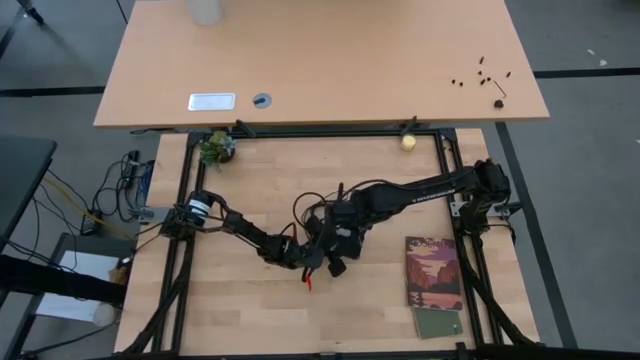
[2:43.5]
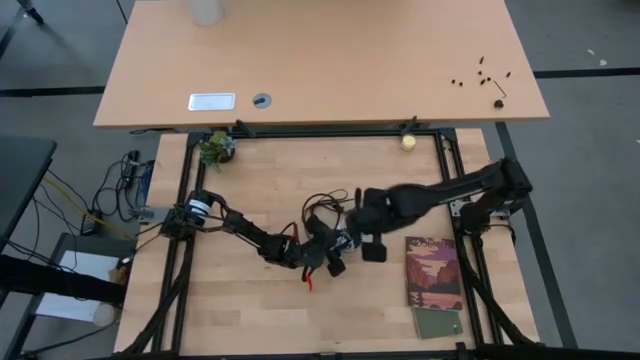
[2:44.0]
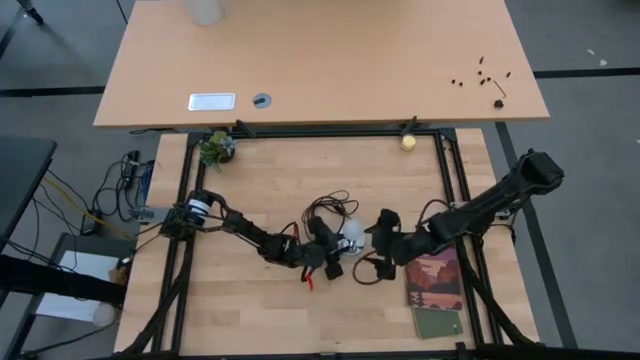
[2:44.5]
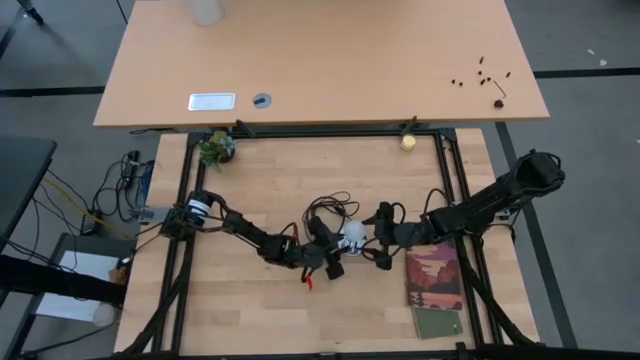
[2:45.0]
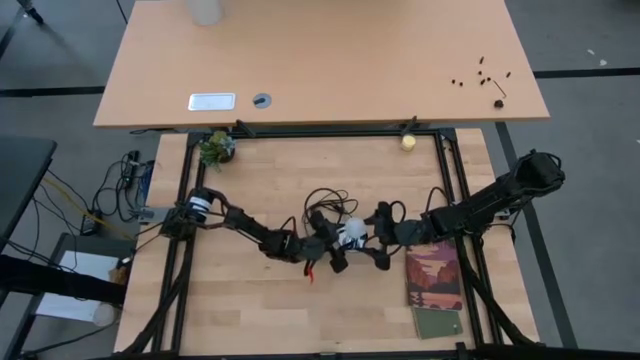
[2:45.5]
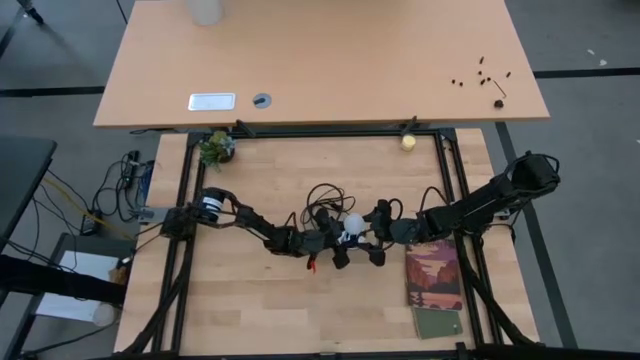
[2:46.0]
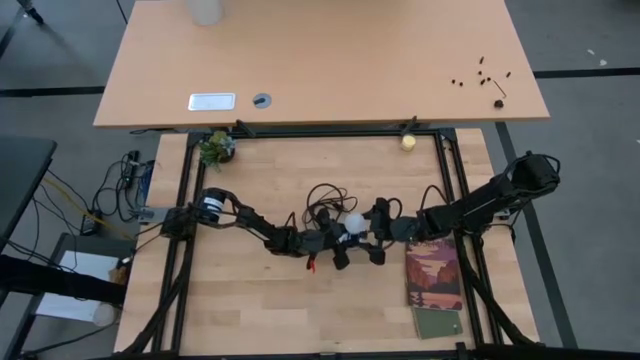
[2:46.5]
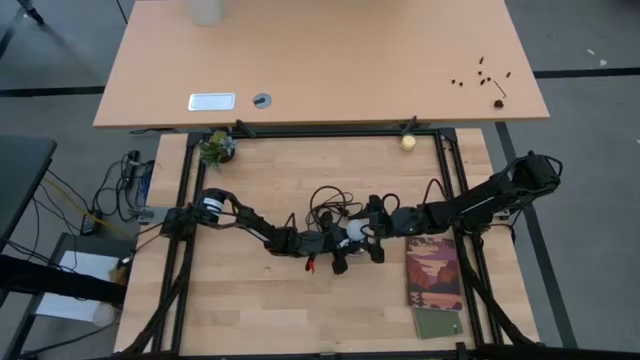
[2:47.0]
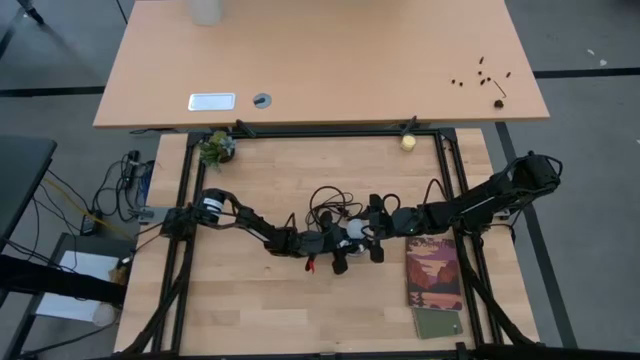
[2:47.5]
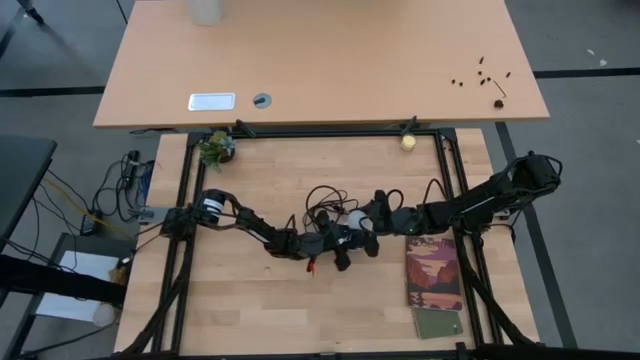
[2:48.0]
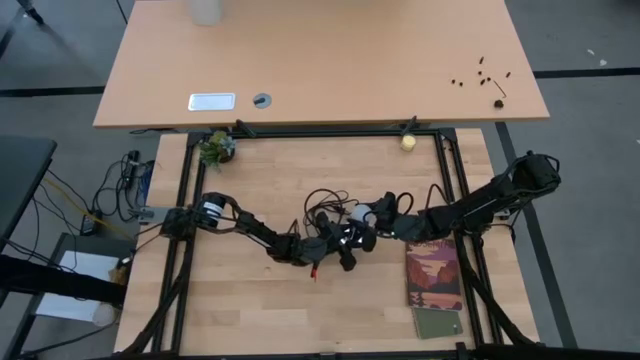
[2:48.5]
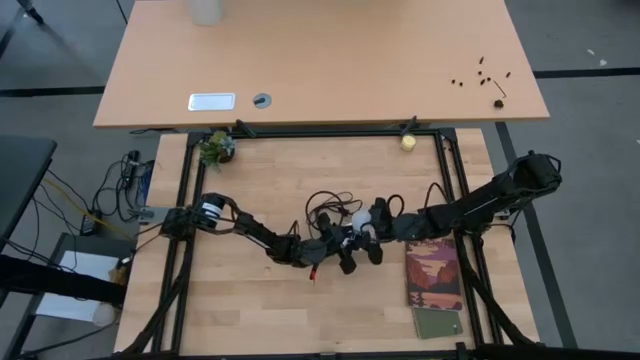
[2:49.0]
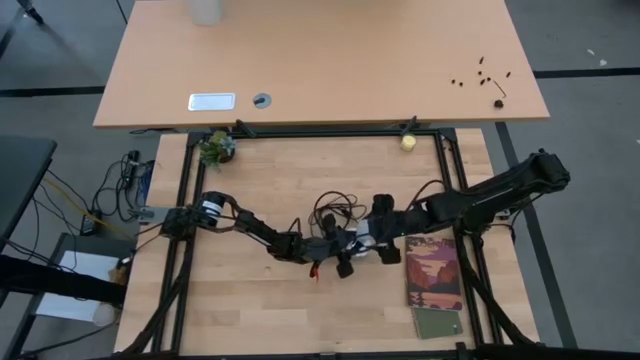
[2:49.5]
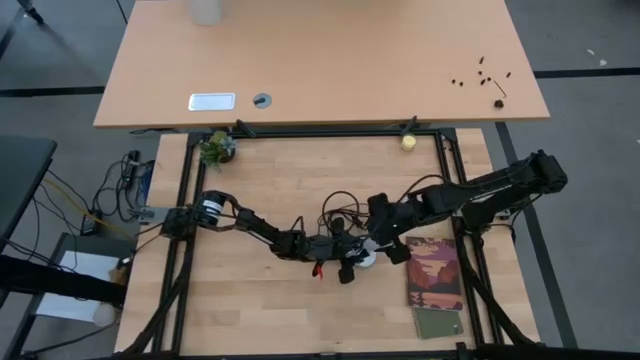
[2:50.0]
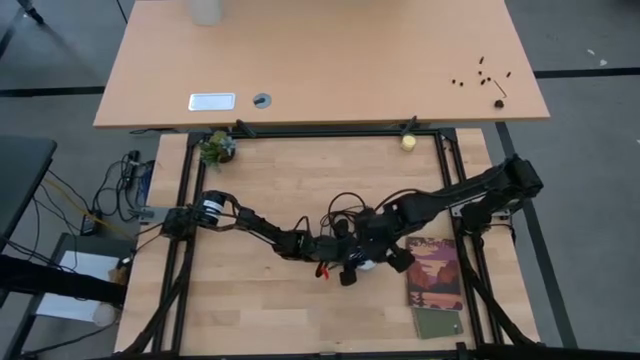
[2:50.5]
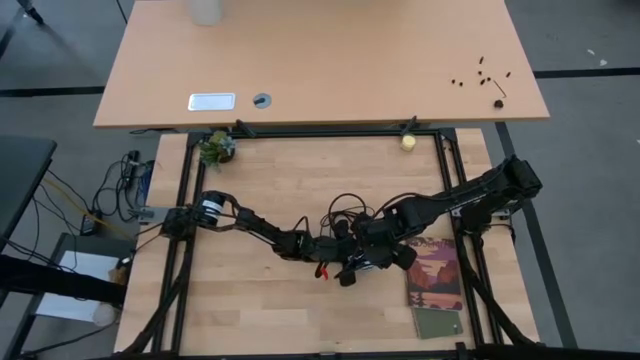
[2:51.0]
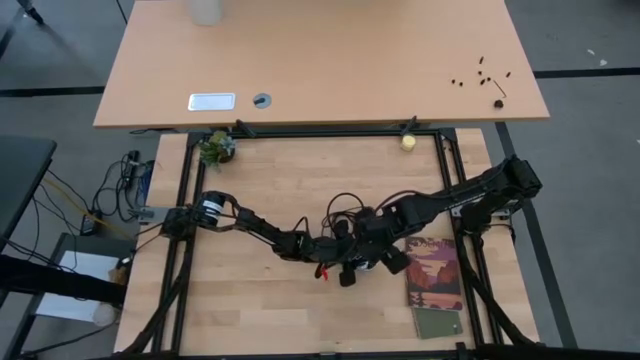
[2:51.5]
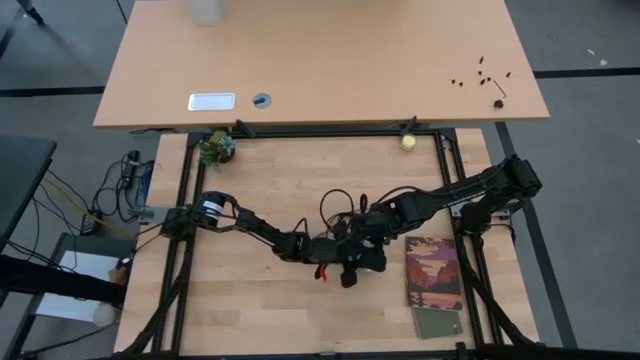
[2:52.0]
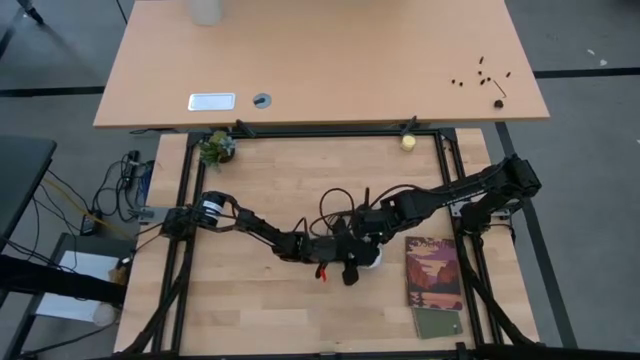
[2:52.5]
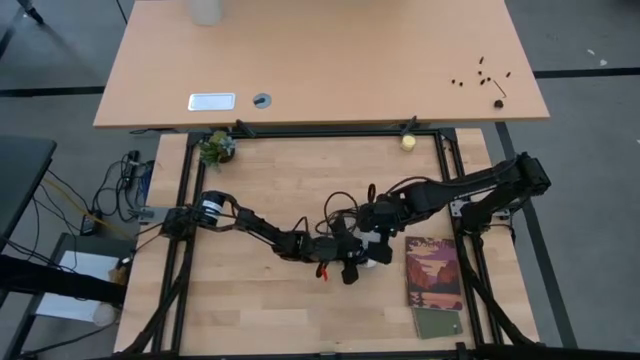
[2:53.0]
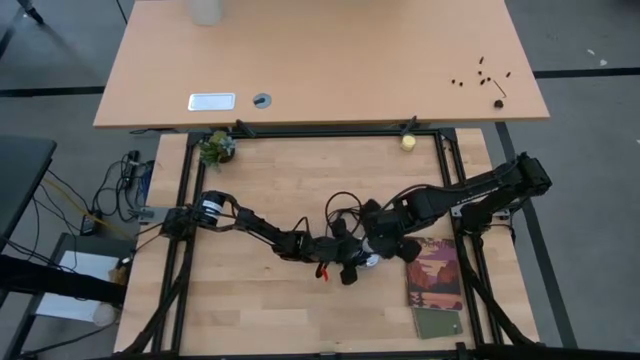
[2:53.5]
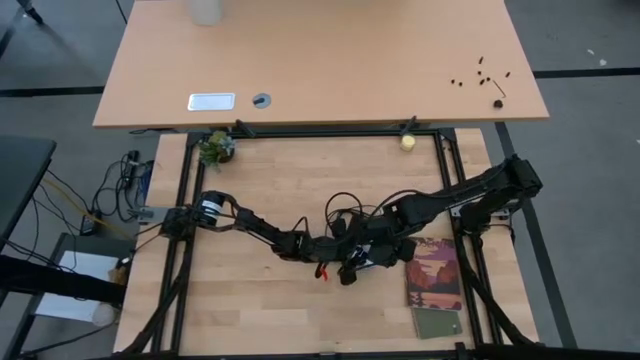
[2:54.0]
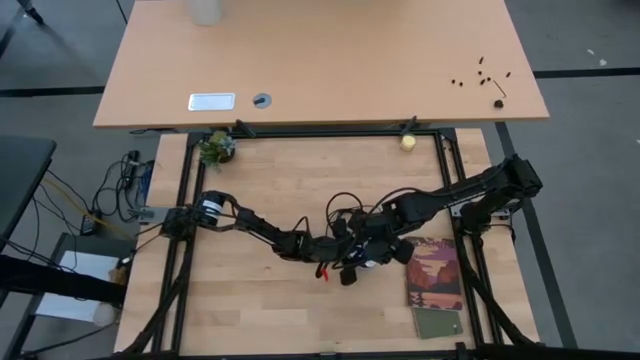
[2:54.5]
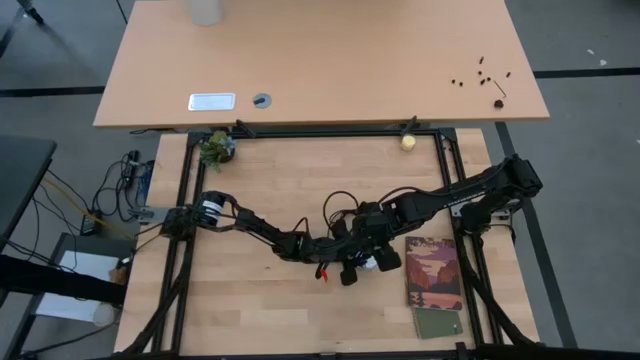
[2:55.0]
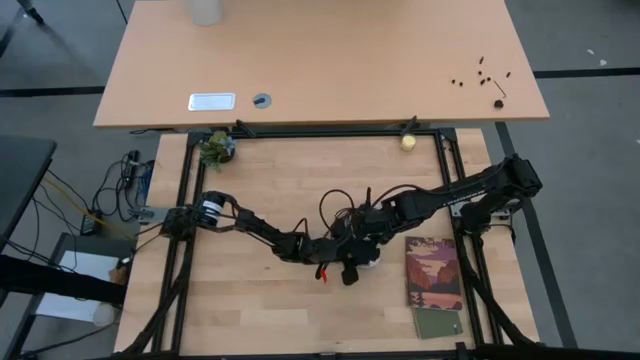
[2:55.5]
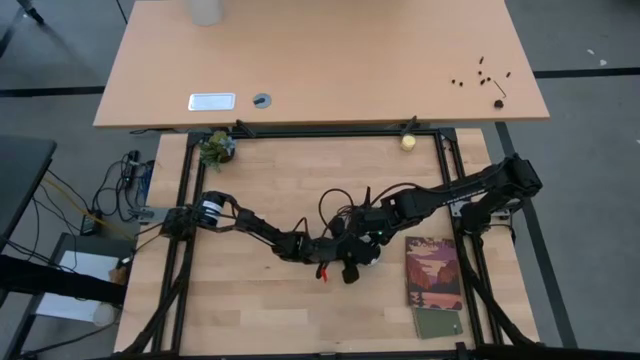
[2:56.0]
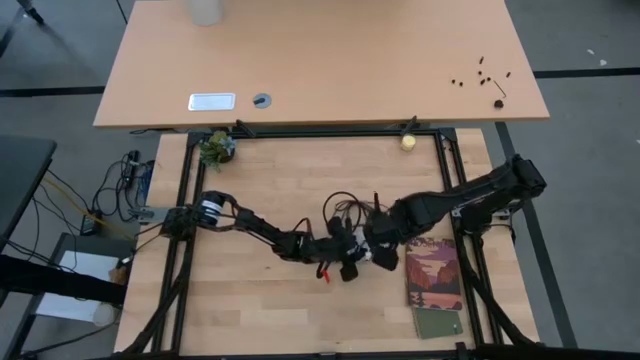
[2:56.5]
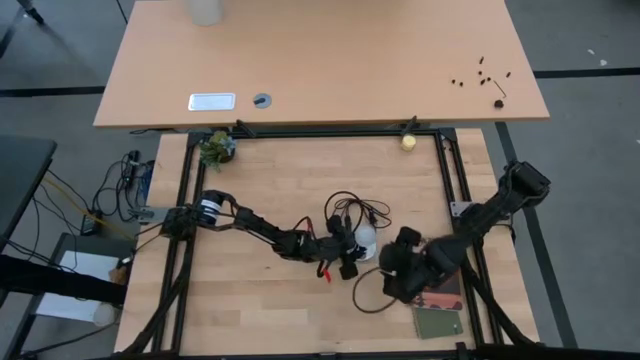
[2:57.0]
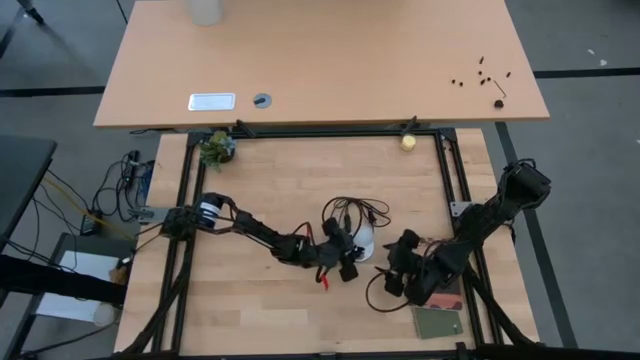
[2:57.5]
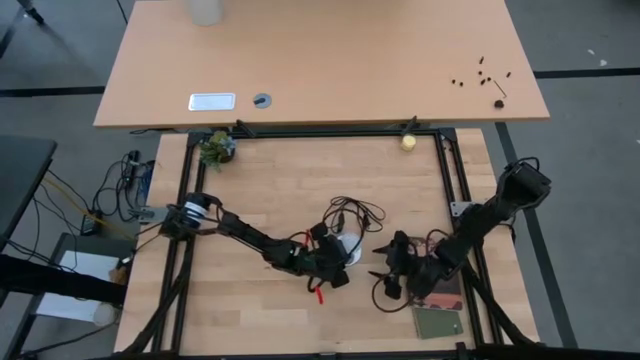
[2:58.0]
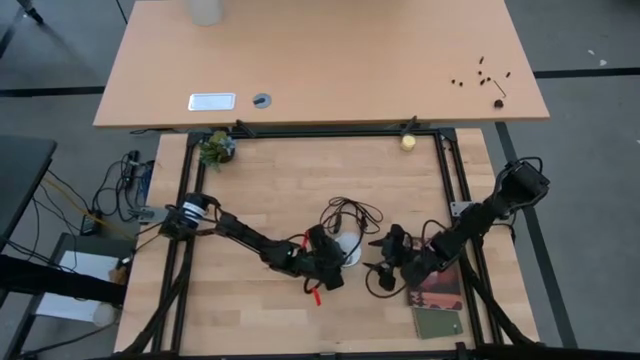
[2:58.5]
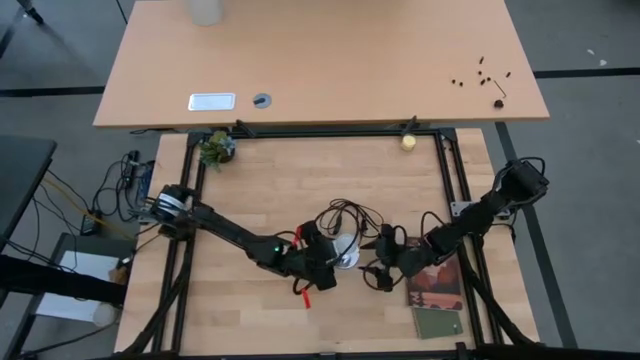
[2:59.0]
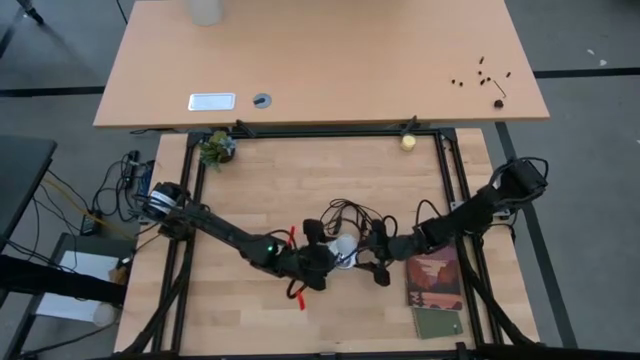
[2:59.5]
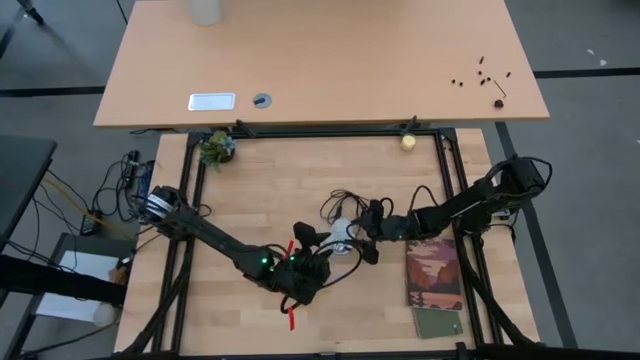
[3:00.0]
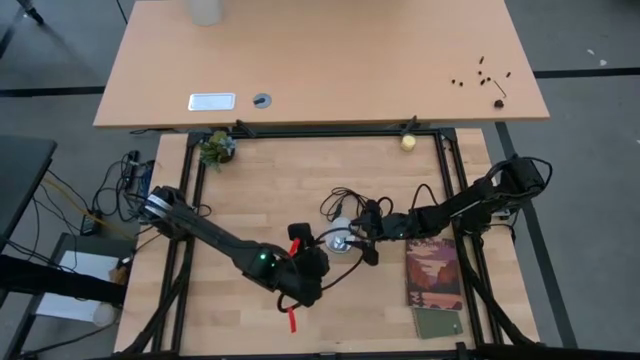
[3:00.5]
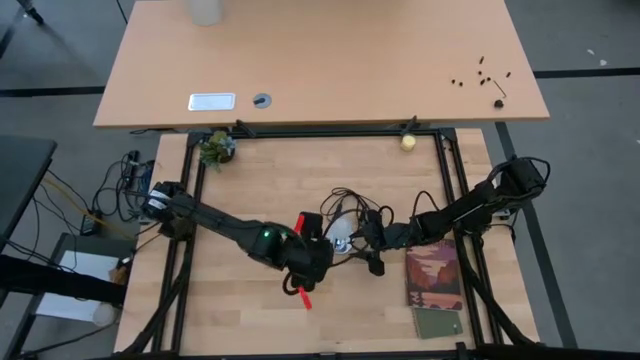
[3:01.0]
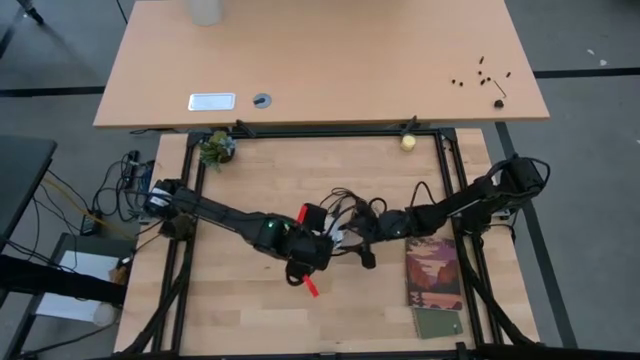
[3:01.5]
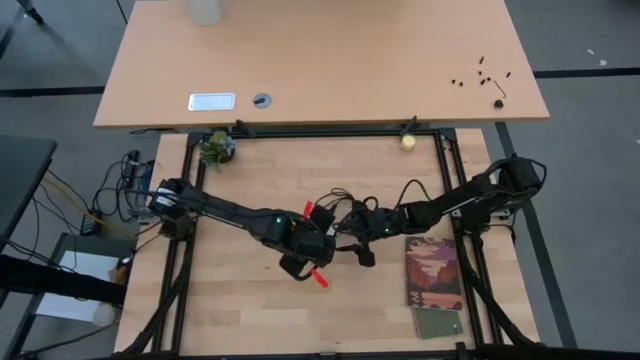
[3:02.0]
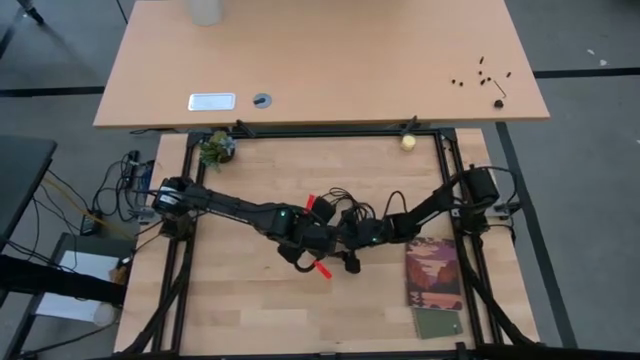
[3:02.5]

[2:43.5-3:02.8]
Task: Screw lightbulb
Insert the white lightbulb into the silver lamp

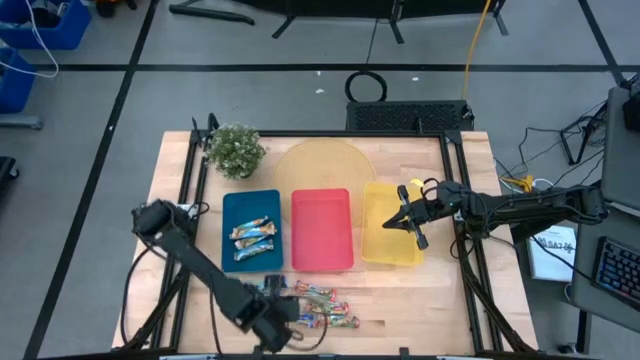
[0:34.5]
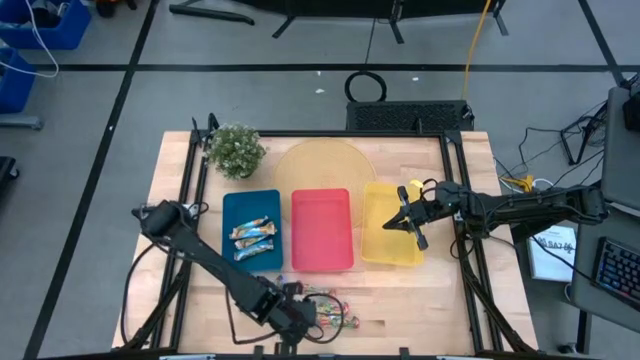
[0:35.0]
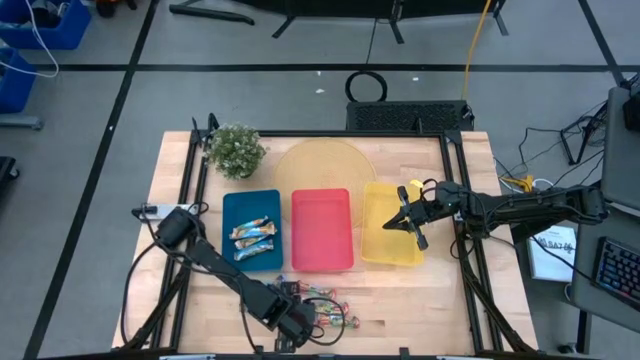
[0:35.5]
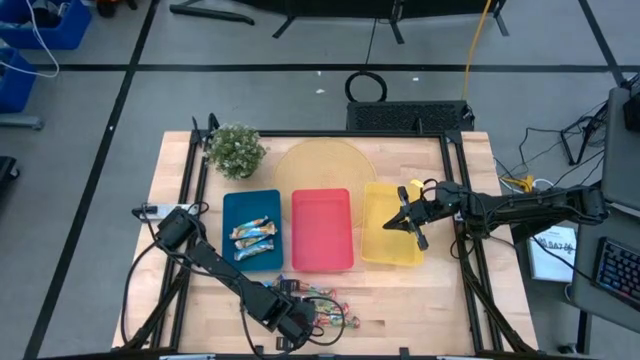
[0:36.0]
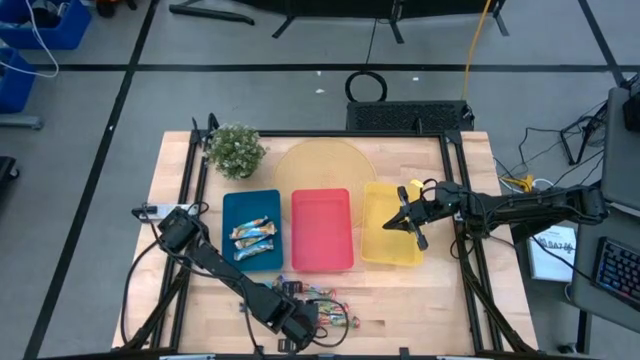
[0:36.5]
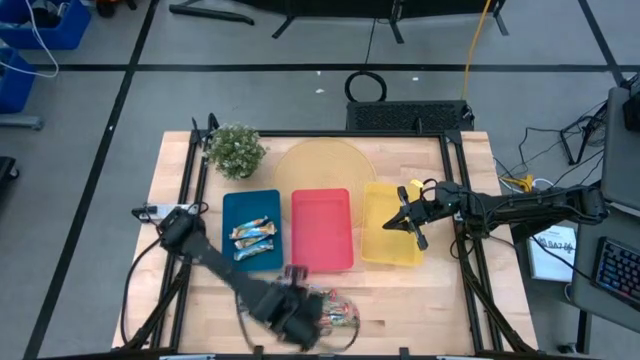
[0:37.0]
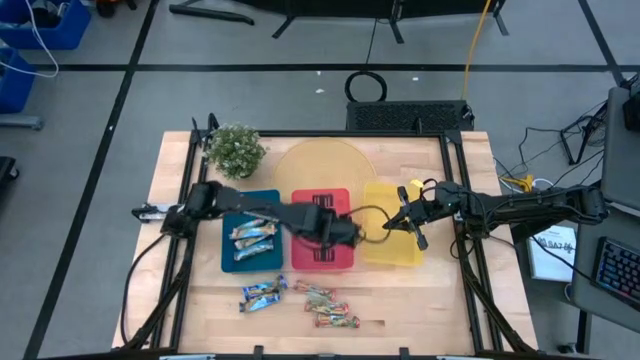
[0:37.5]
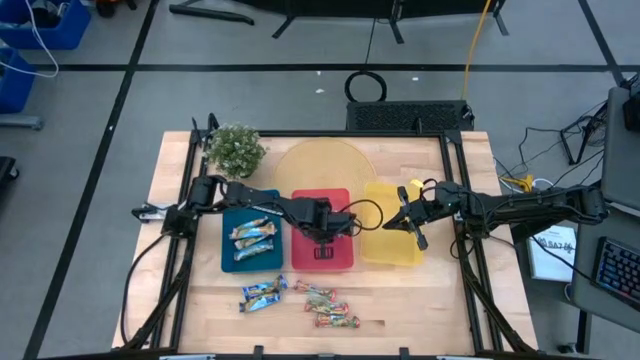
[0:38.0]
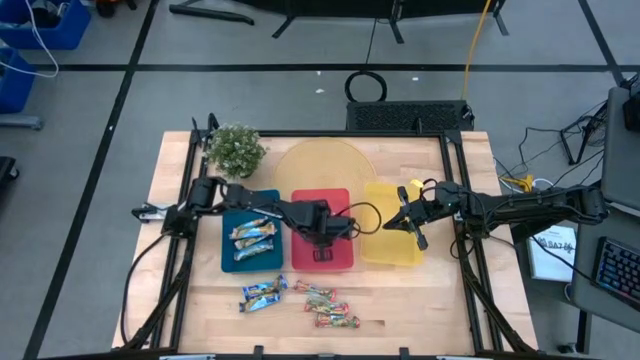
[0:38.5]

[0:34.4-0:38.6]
Task: Pick and place Granola Bars by type
Put the blue granola bar into the pink bin
